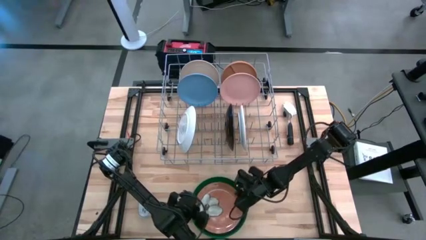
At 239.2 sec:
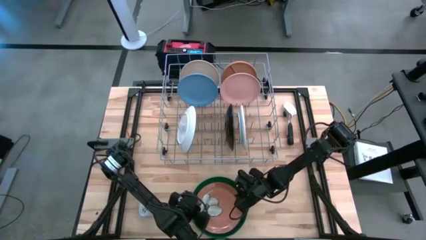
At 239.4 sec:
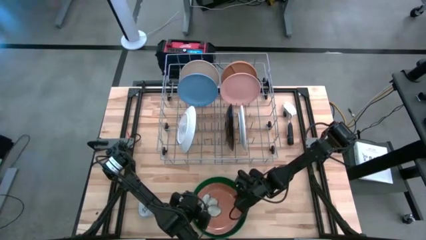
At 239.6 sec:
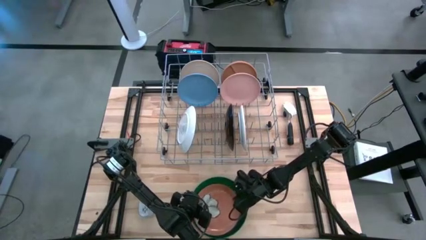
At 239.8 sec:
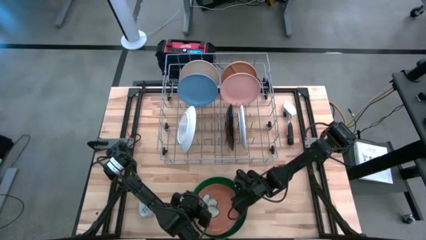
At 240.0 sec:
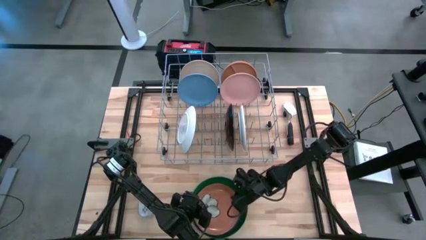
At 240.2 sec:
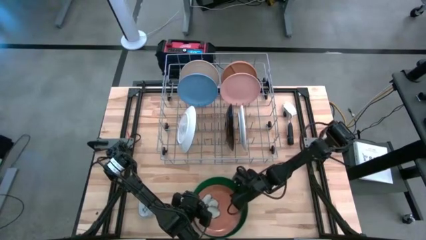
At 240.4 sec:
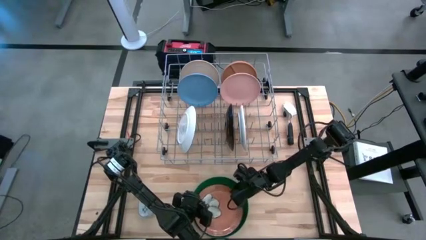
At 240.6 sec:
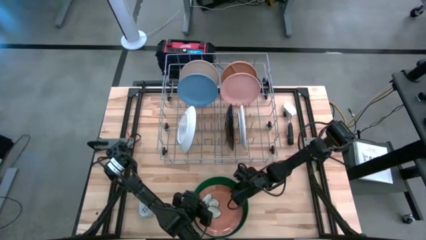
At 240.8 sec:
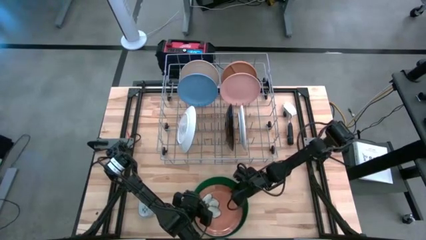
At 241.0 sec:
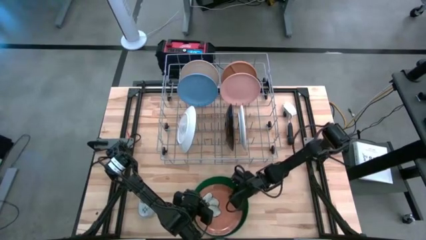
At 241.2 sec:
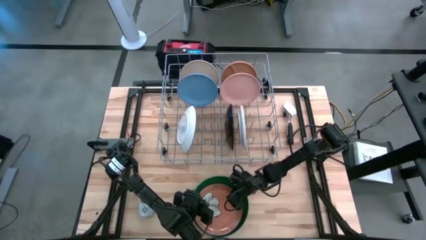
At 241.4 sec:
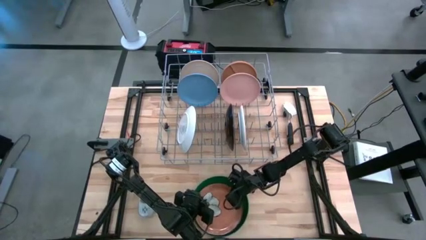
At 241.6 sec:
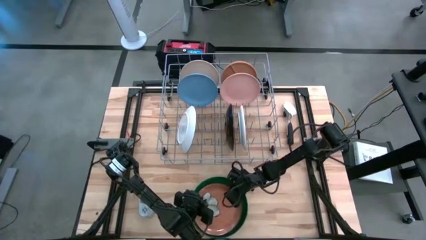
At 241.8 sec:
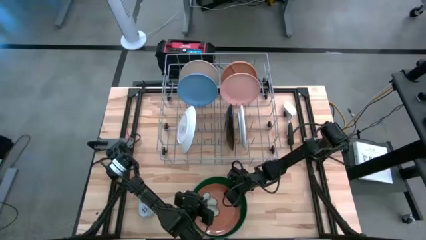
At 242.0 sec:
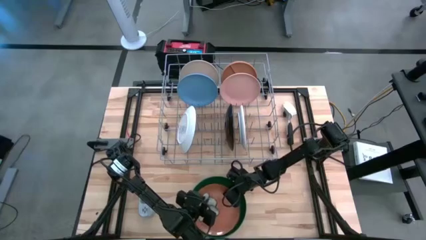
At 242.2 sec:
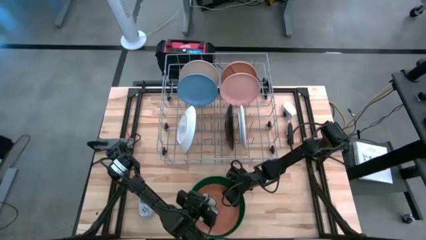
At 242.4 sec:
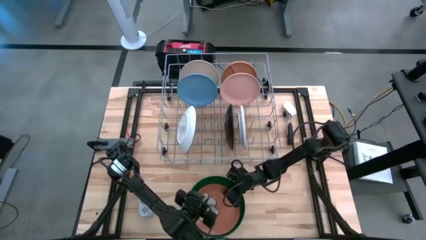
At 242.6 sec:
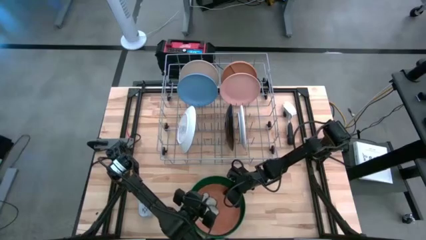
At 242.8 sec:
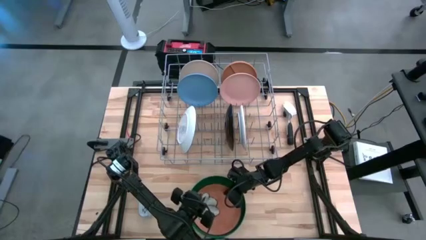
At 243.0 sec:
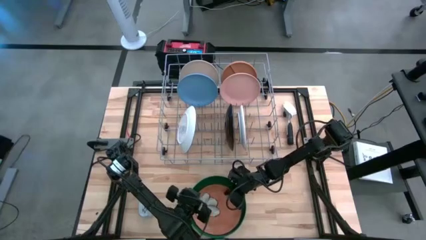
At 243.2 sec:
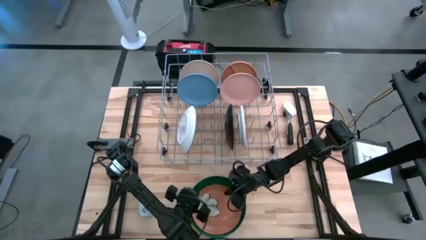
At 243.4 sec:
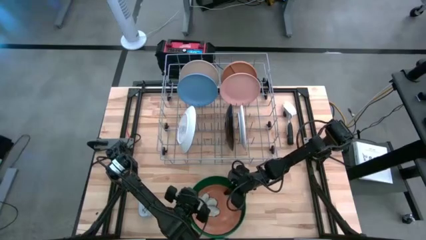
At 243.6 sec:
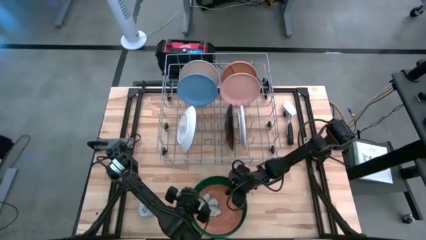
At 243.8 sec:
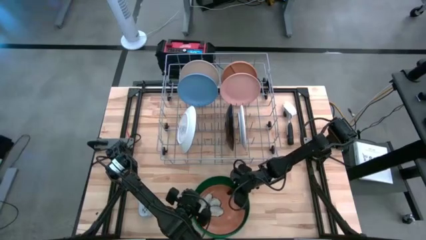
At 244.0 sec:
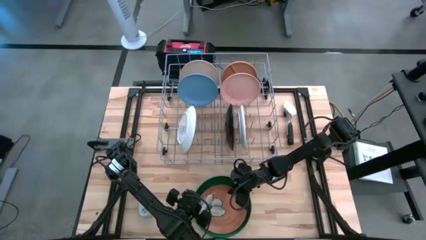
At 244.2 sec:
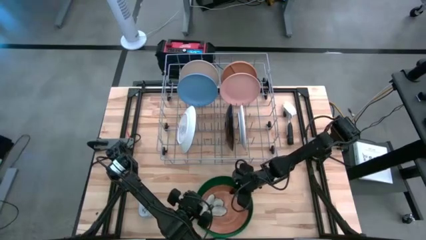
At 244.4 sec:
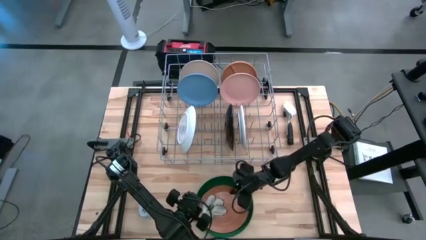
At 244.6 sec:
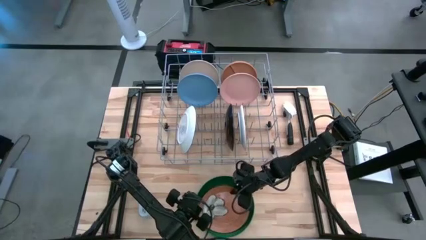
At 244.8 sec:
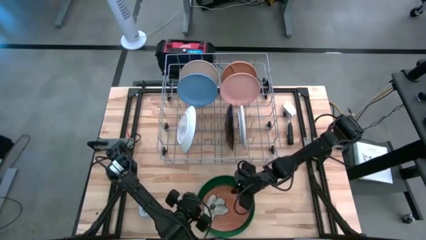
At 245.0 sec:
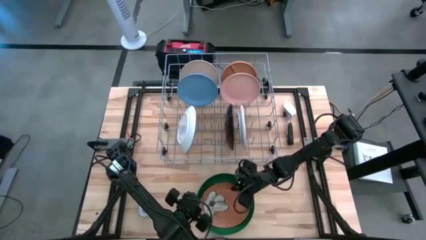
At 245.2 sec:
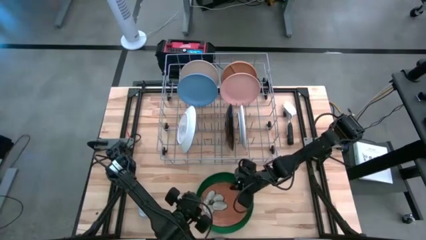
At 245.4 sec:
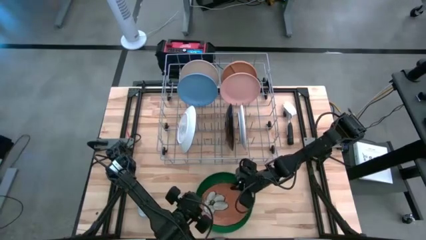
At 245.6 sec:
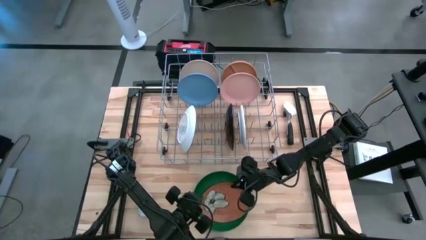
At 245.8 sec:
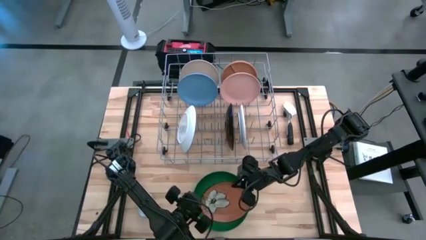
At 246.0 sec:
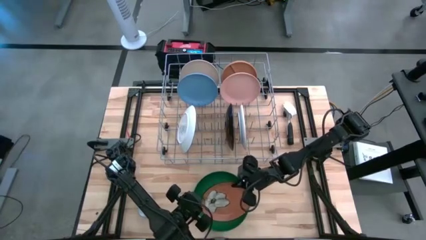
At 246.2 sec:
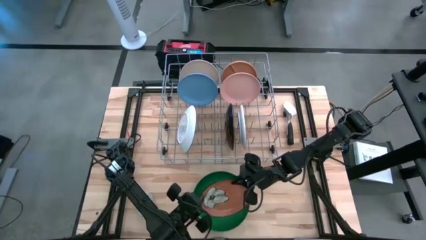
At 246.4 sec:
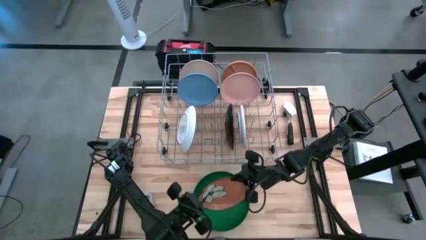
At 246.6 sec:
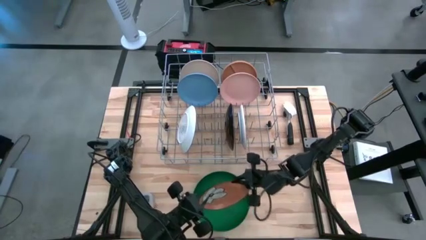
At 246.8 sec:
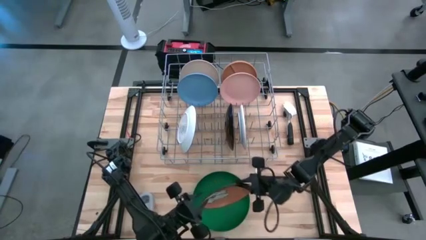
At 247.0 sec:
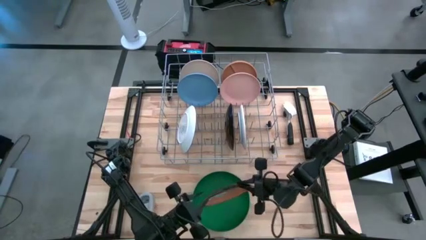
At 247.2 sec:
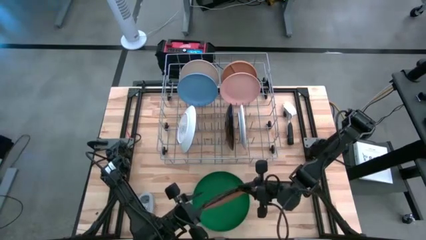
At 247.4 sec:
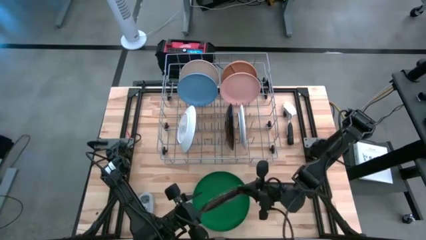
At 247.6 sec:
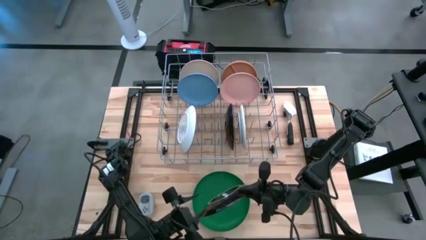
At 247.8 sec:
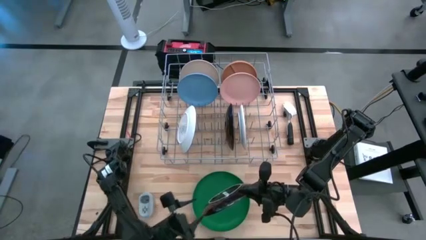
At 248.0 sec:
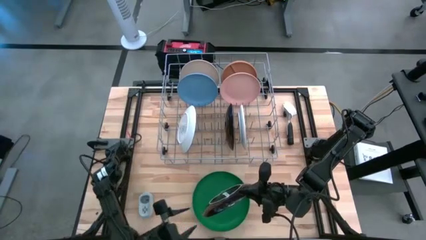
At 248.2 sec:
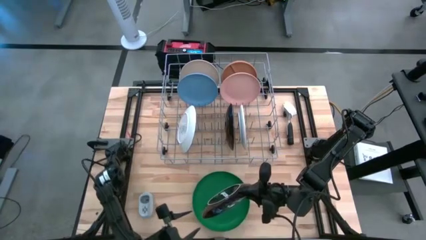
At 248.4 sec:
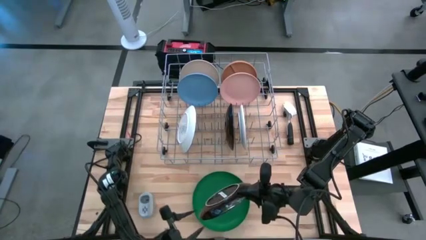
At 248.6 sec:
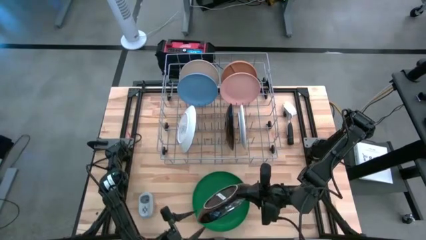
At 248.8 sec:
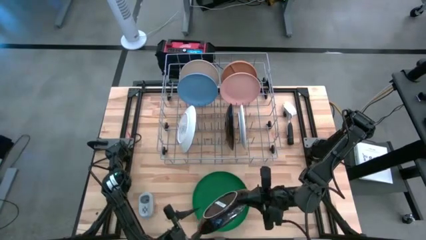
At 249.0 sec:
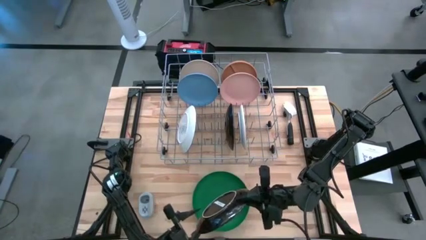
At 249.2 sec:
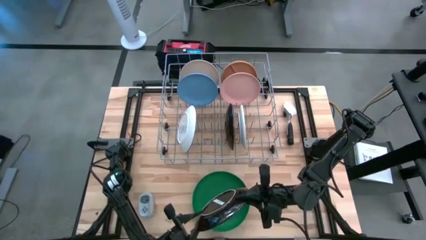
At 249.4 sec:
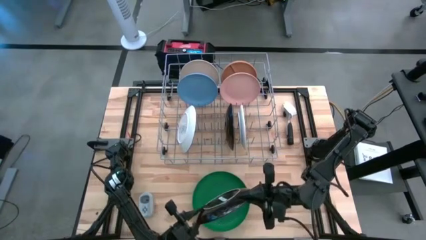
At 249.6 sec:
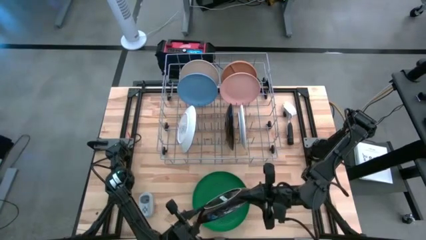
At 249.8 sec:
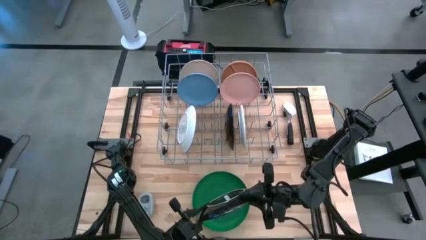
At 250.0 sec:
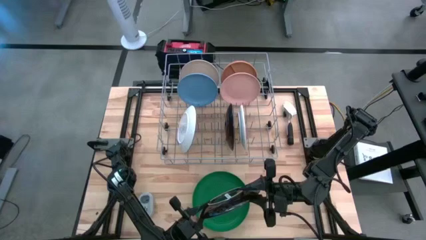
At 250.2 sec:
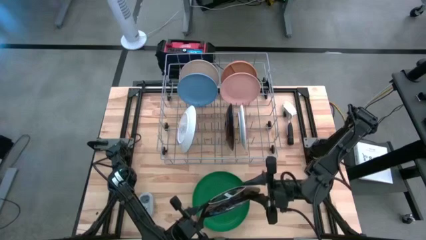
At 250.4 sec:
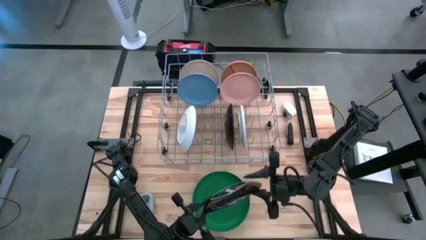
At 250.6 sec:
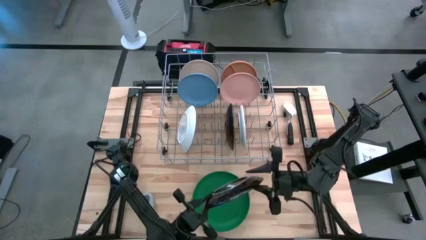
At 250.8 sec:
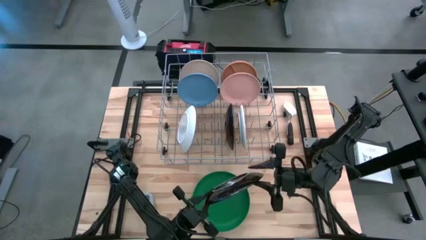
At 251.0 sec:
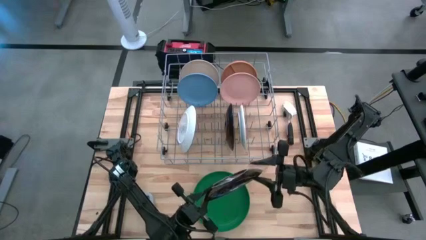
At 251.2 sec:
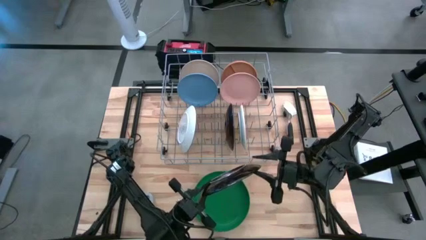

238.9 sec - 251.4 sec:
Task: Sort dishes
Put the orange flower patterned plate into the dish rack
